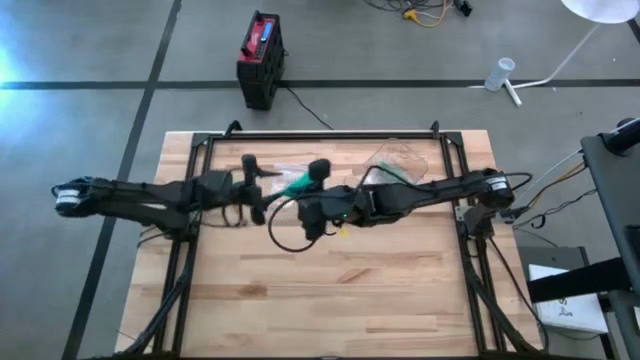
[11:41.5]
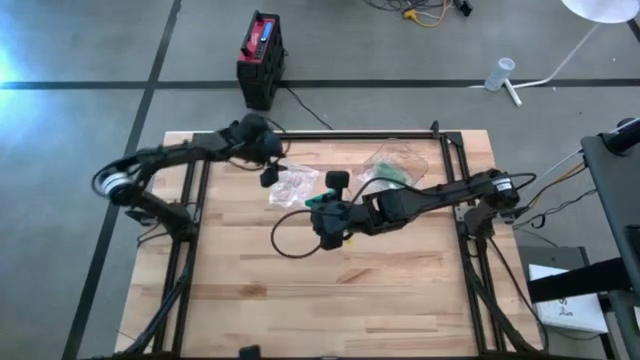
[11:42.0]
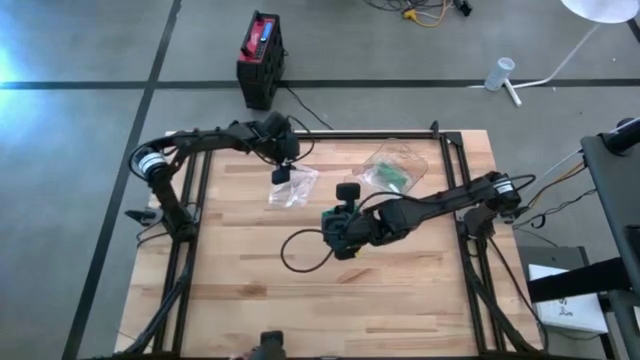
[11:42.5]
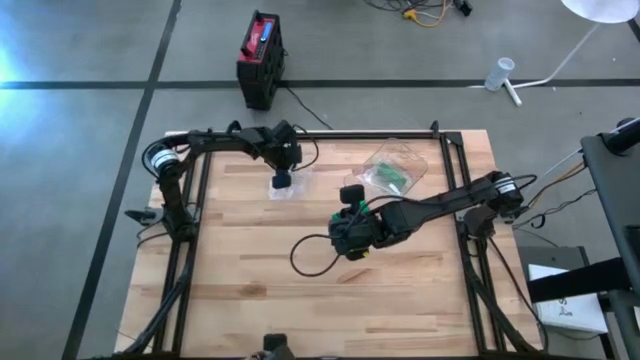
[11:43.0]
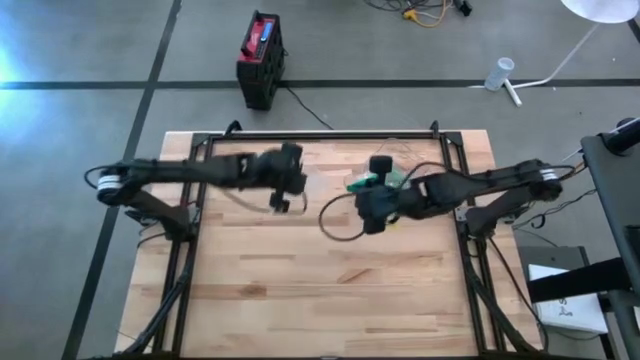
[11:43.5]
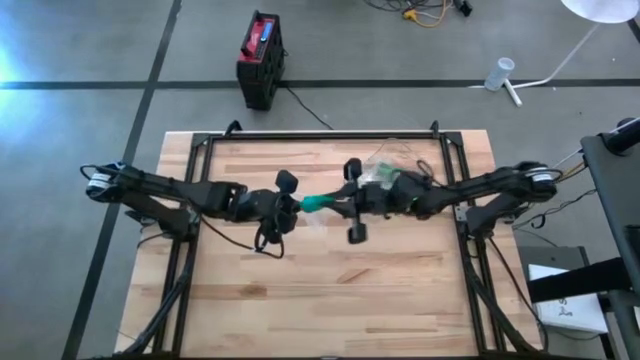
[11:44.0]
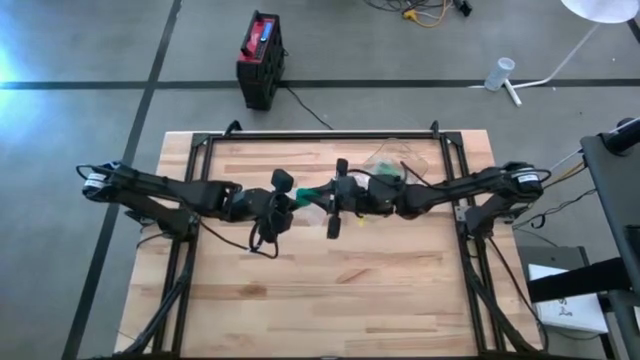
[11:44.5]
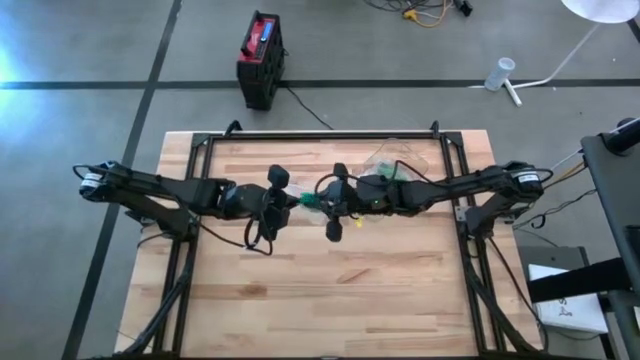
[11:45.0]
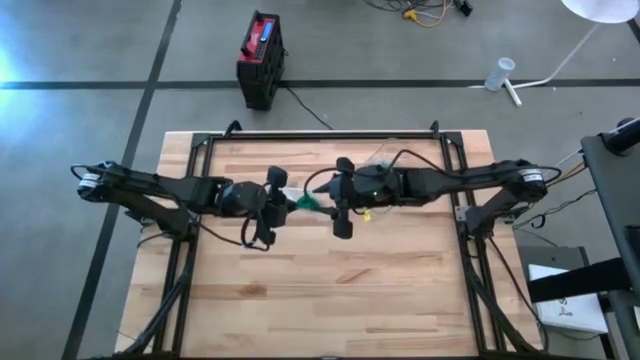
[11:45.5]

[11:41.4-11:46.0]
Task: Roll bandage
Put the rolled dark green bandage into the transparent zip bag

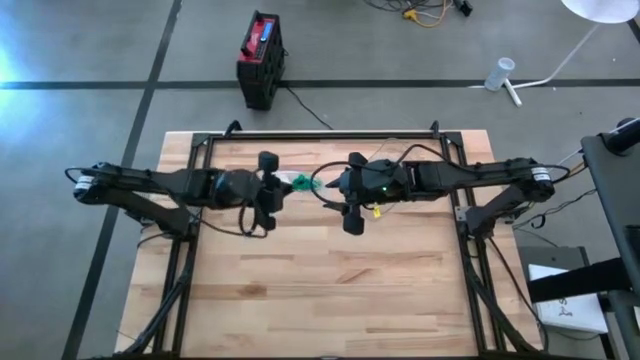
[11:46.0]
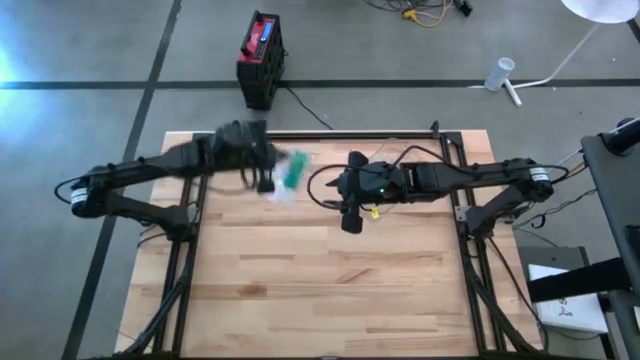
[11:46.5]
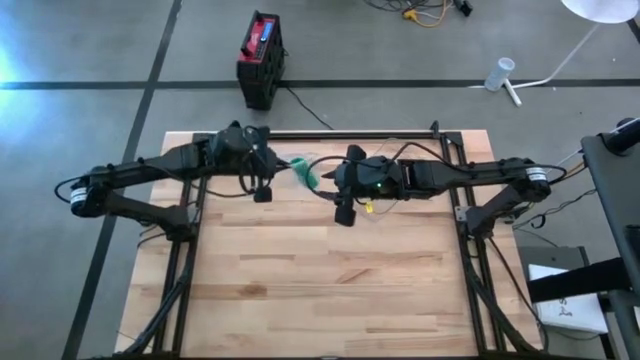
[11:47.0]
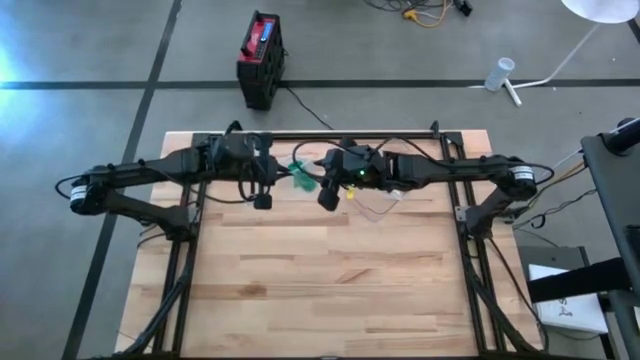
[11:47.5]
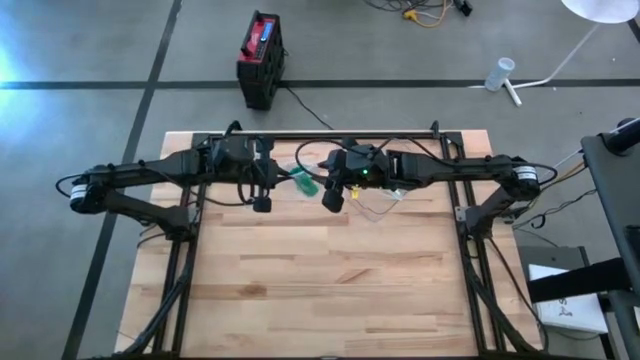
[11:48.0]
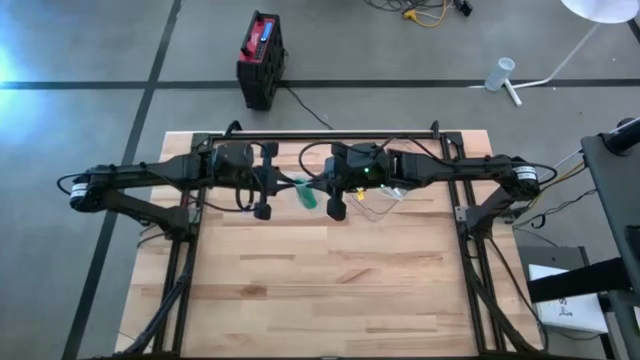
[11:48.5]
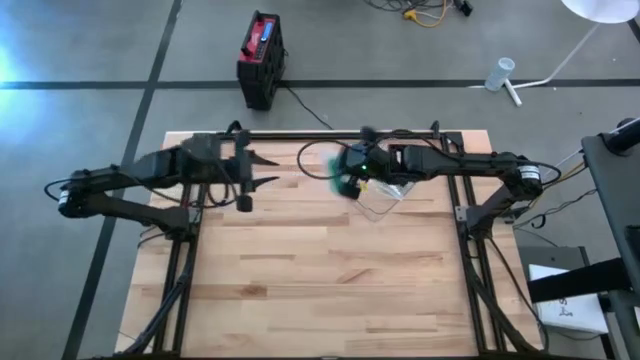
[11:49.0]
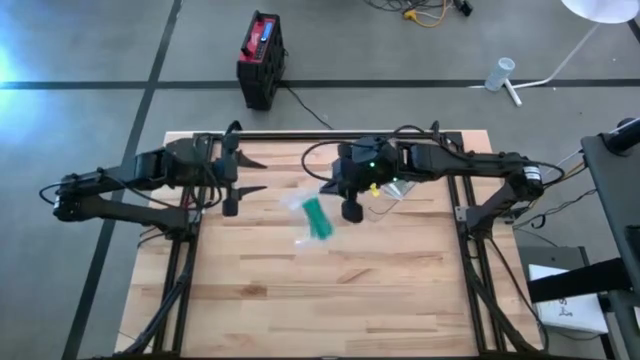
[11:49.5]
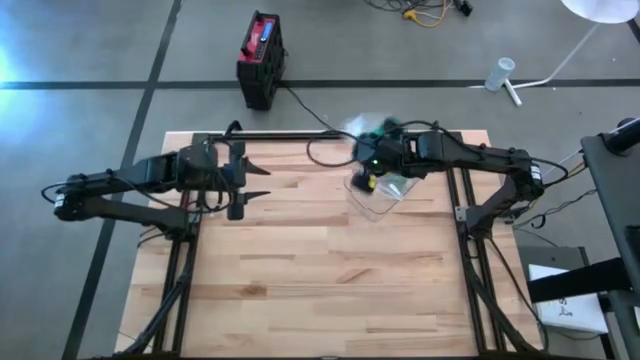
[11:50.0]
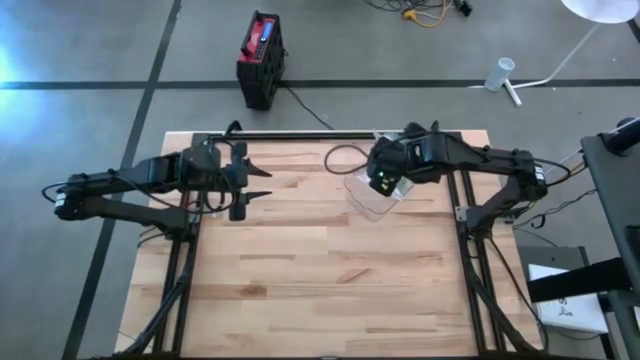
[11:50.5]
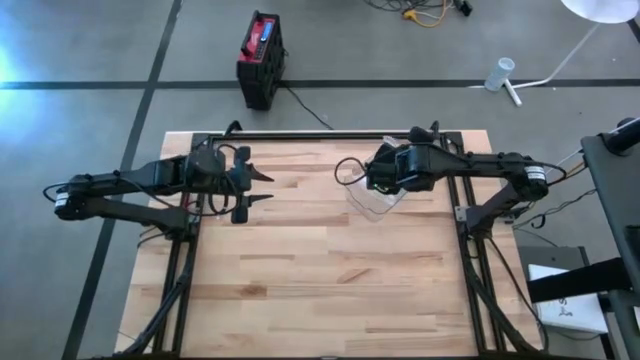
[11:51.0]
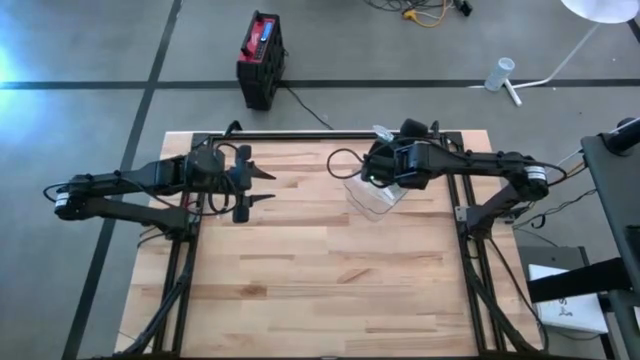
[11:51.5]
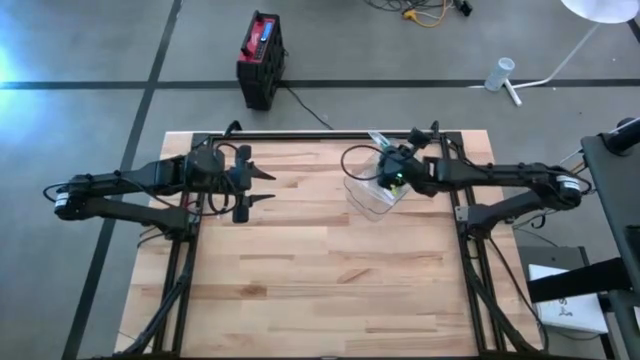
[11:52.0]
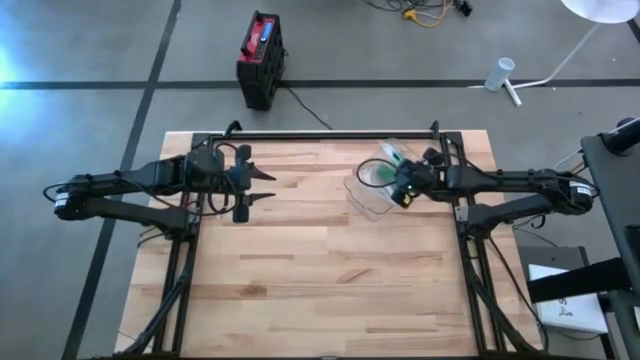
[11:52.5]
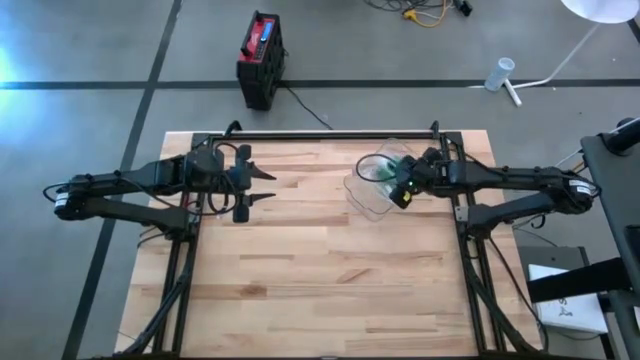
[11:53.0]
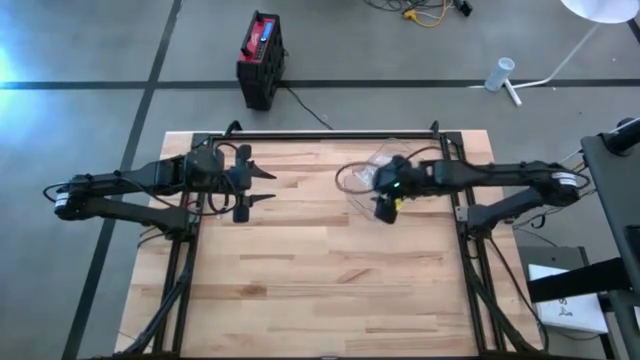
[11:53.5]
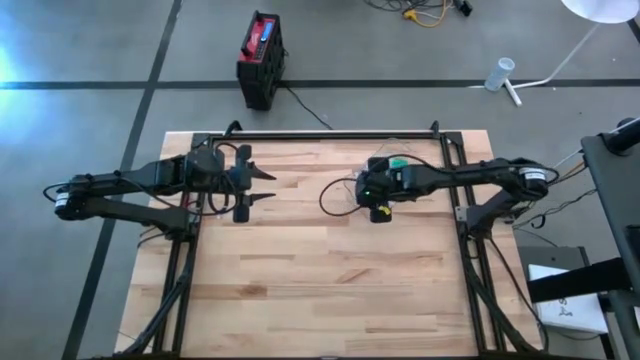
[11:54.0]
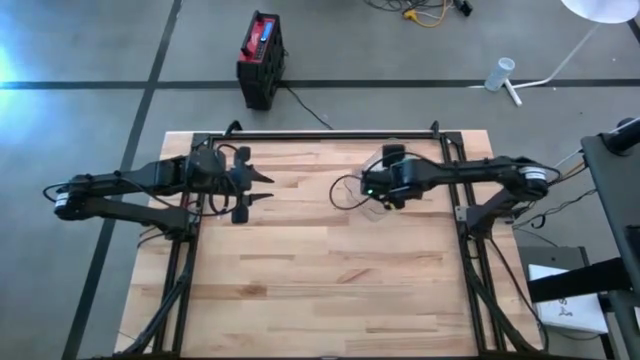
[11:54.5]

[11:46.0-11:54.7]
Put the transparent zip bag with the rolled dark green bandage into the transparent bin

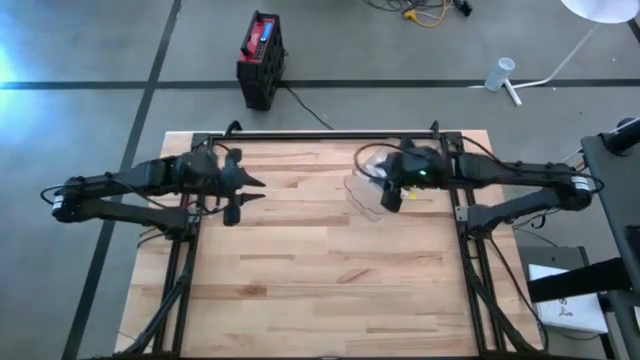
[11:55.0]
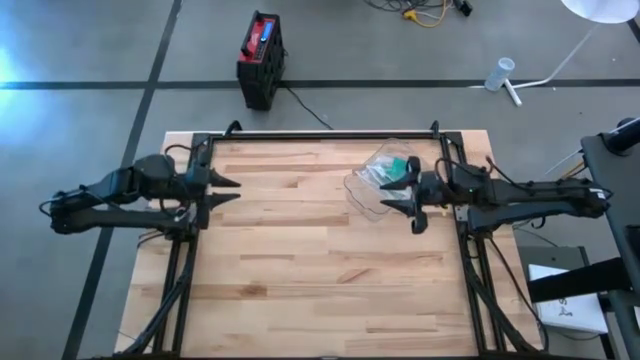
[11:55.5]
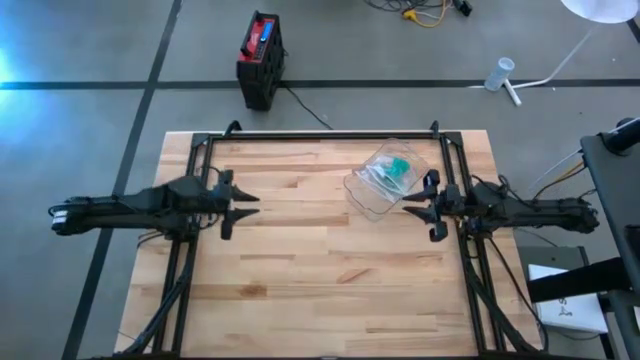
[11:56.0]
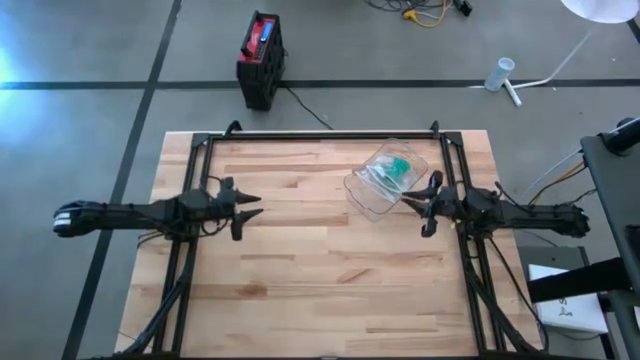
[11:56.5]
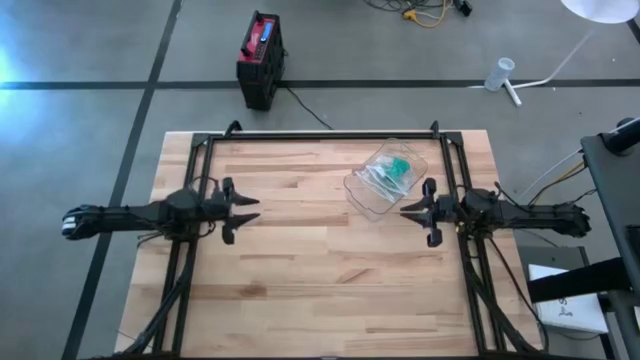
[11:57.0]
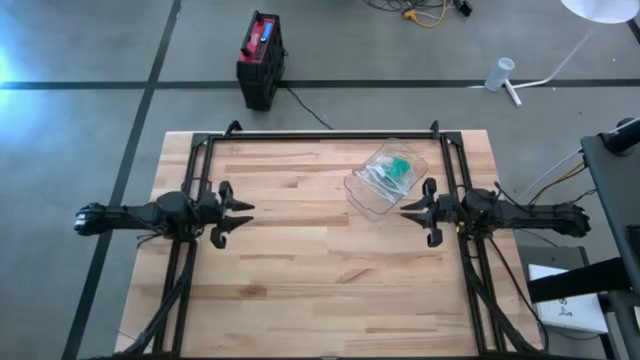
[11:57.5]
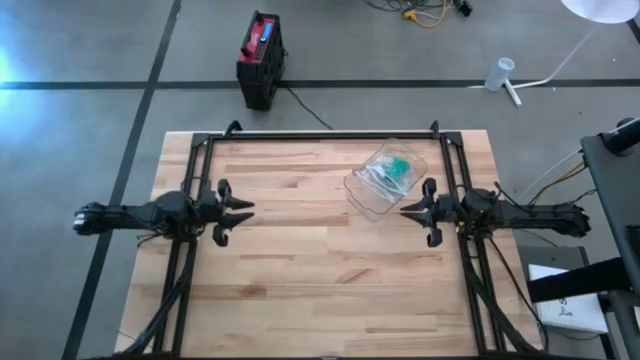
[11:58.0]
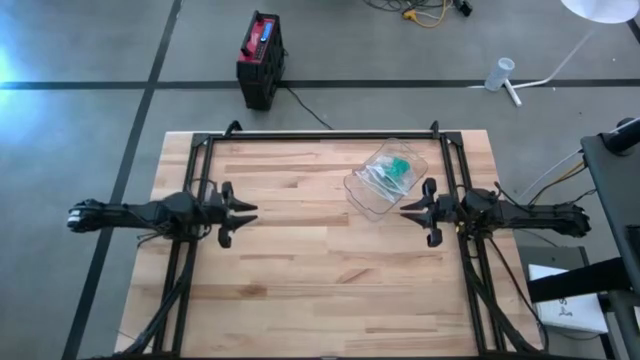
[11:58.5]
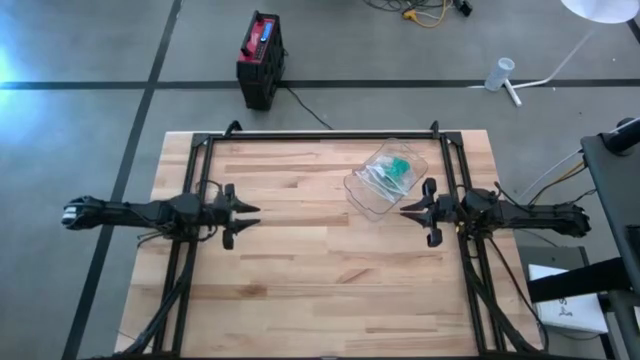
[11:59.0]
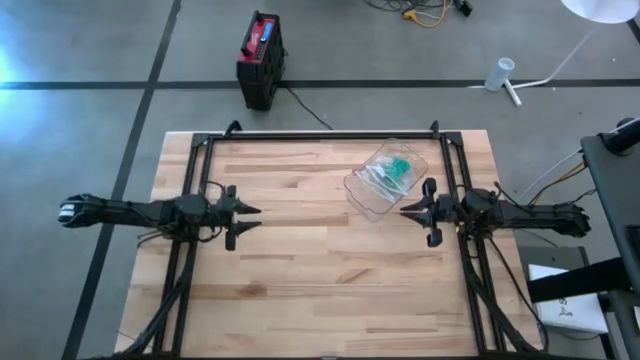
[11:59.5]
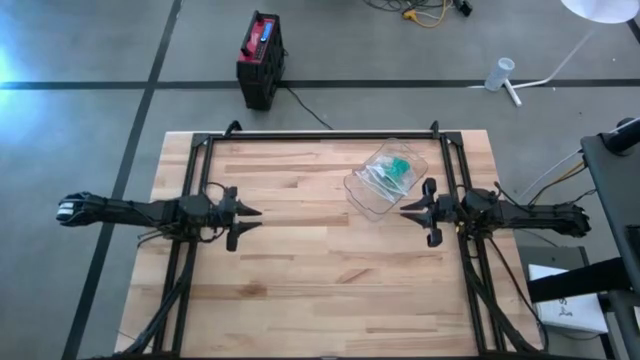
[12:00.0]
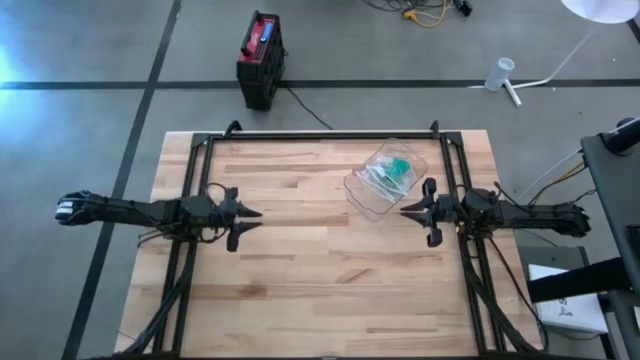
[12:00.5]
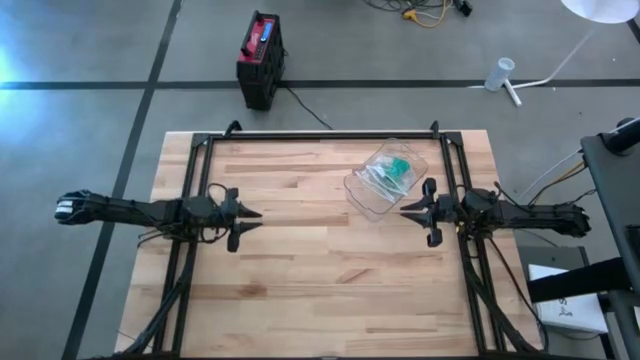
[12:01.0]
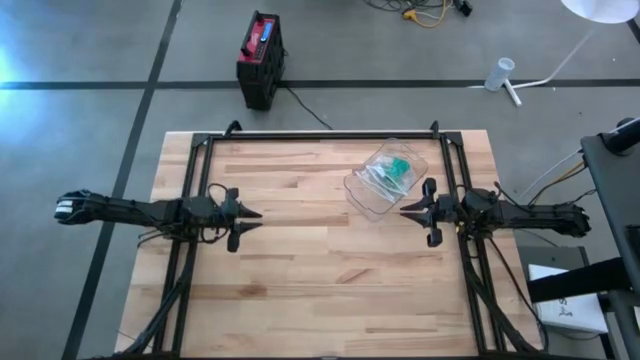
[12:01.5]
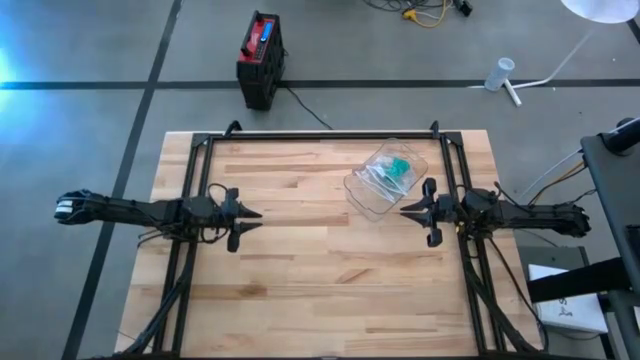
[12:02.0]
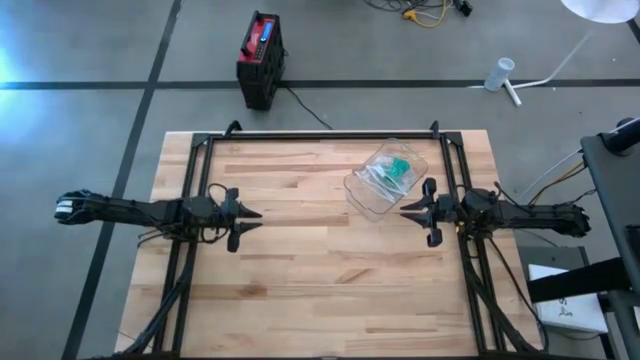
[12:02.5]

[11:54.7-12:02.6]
Return to Home Position
